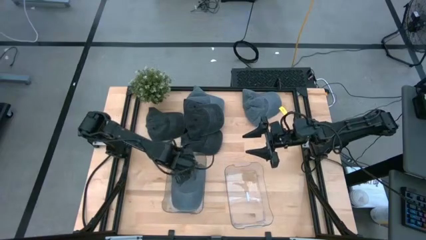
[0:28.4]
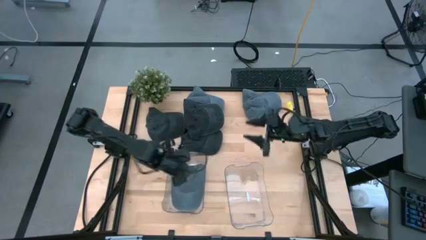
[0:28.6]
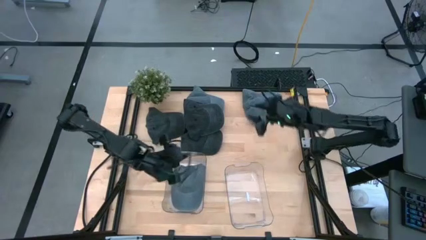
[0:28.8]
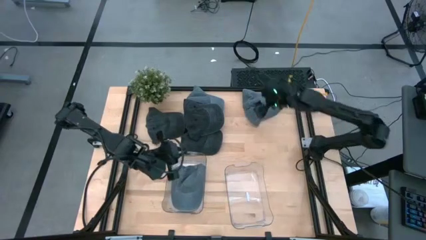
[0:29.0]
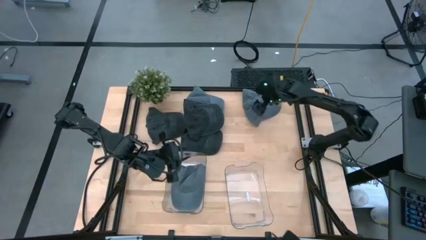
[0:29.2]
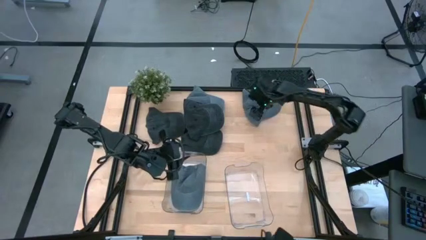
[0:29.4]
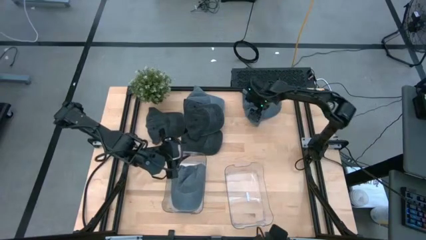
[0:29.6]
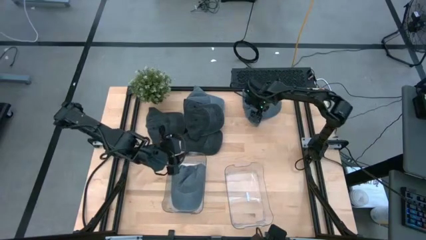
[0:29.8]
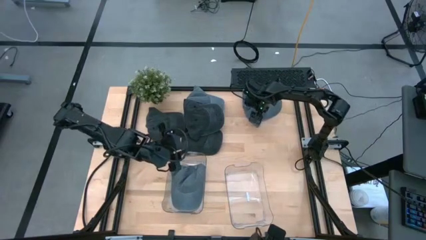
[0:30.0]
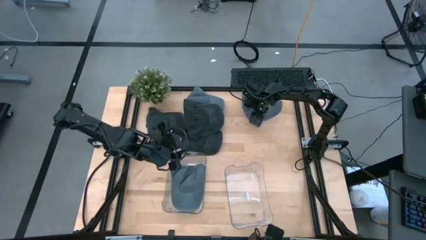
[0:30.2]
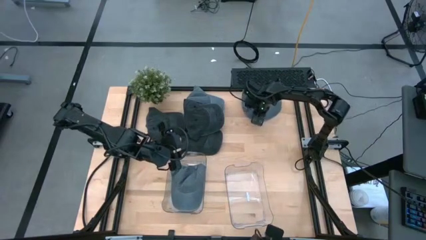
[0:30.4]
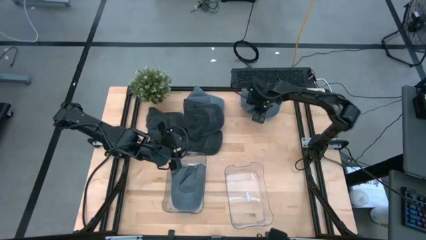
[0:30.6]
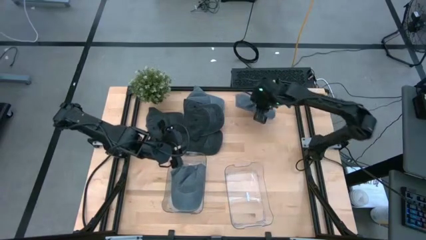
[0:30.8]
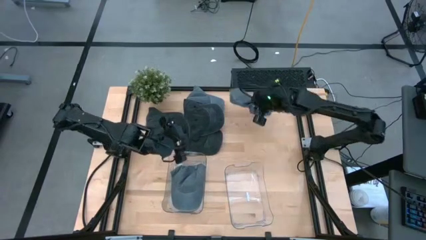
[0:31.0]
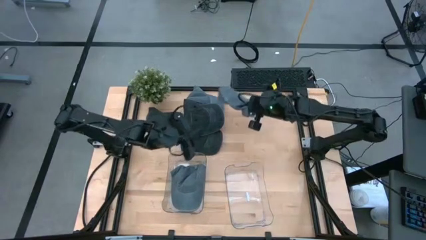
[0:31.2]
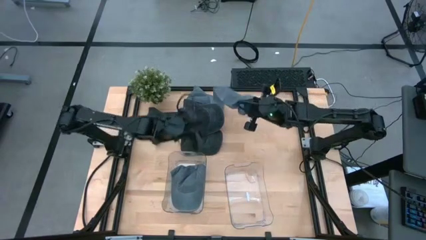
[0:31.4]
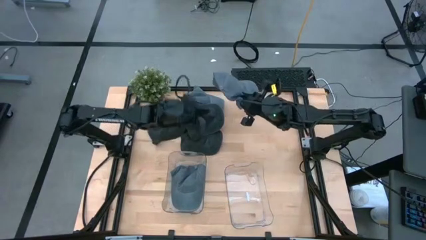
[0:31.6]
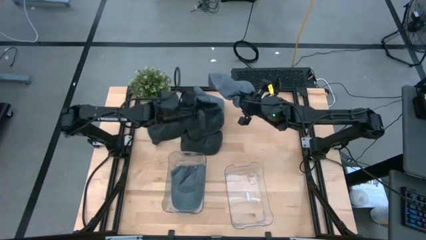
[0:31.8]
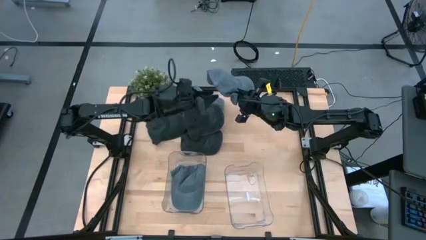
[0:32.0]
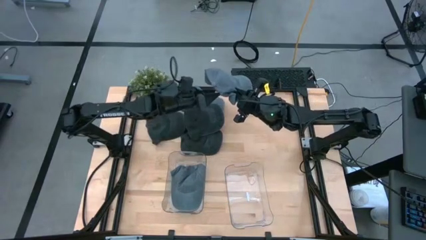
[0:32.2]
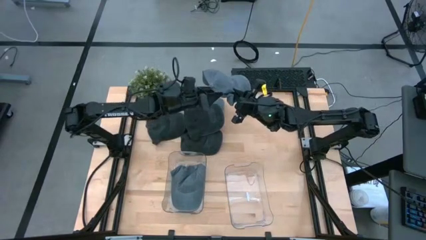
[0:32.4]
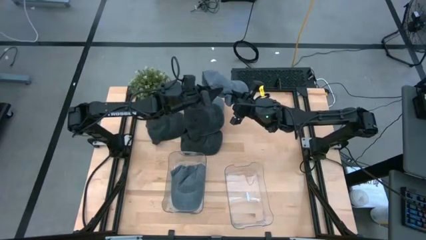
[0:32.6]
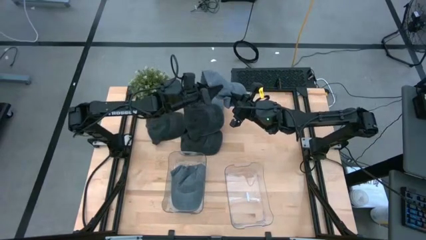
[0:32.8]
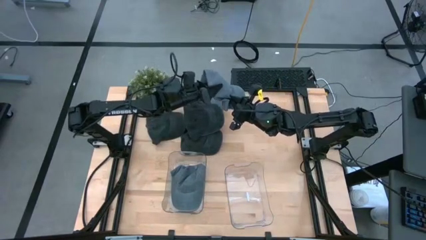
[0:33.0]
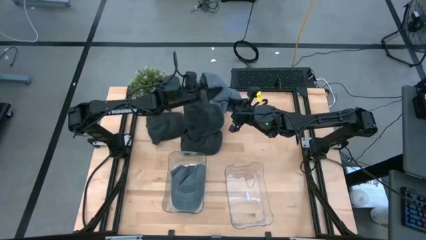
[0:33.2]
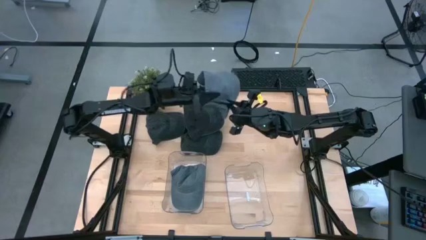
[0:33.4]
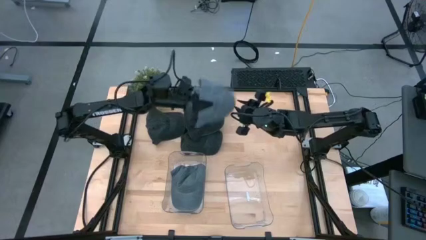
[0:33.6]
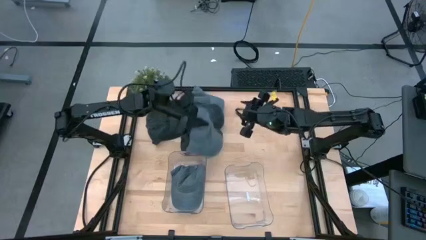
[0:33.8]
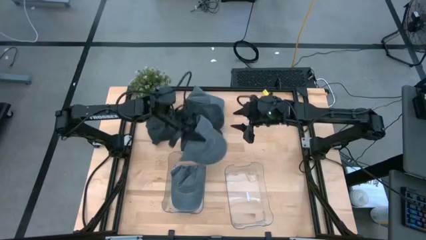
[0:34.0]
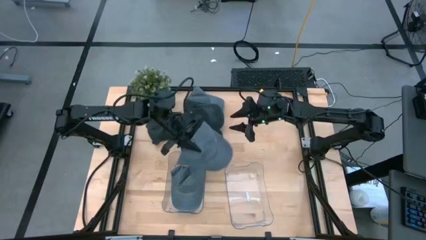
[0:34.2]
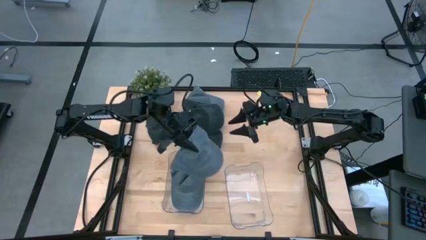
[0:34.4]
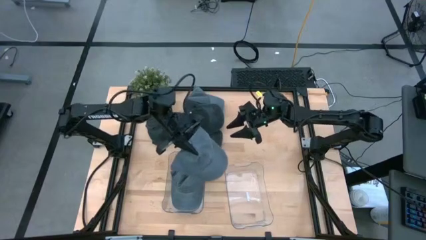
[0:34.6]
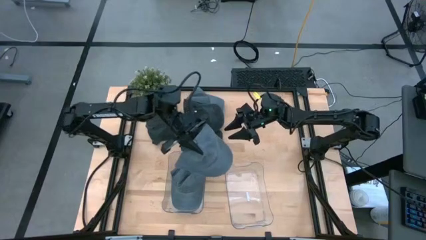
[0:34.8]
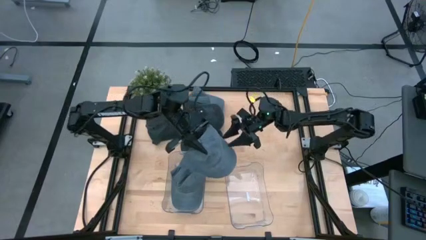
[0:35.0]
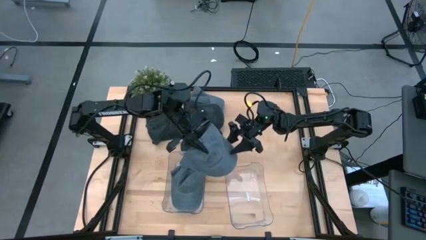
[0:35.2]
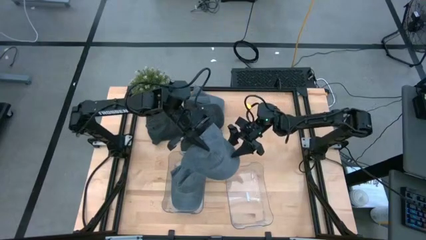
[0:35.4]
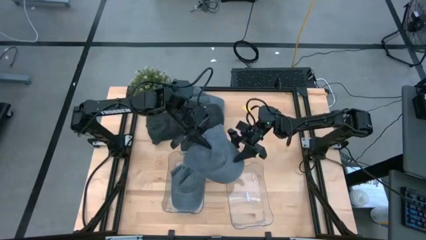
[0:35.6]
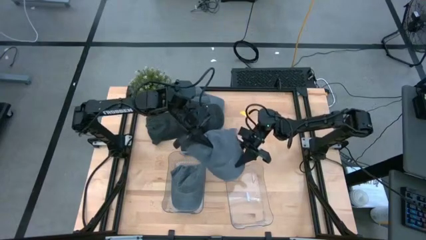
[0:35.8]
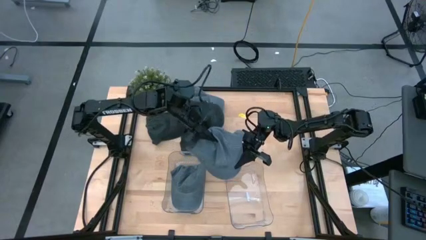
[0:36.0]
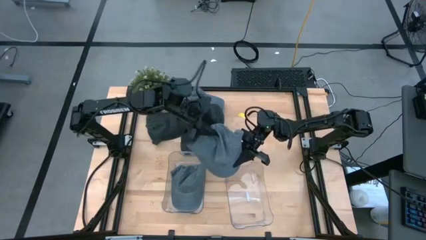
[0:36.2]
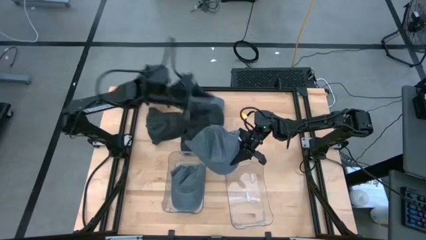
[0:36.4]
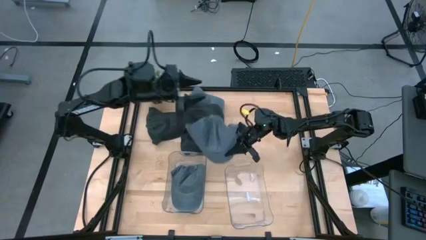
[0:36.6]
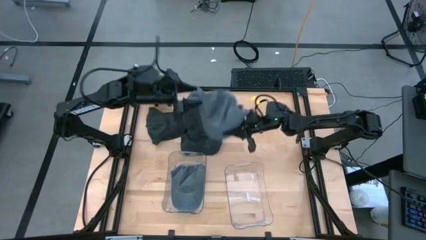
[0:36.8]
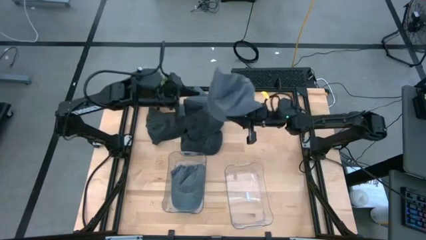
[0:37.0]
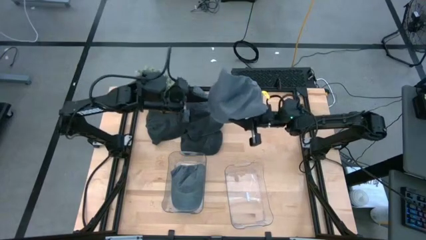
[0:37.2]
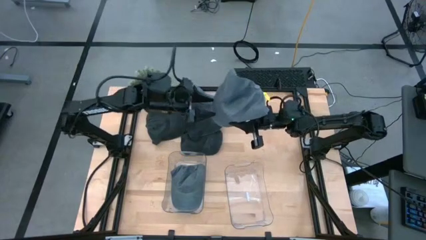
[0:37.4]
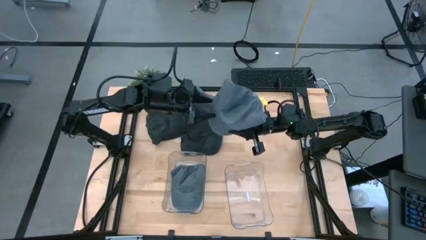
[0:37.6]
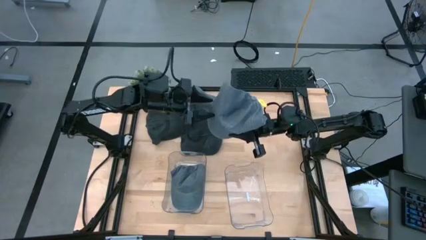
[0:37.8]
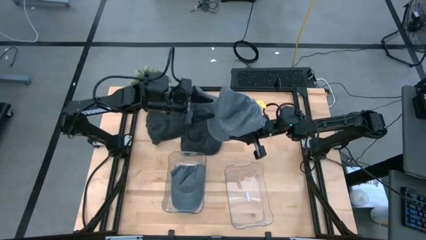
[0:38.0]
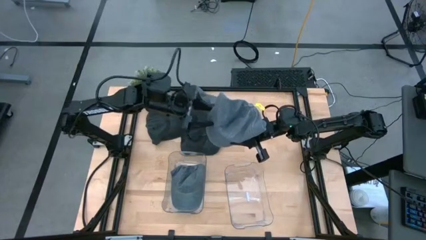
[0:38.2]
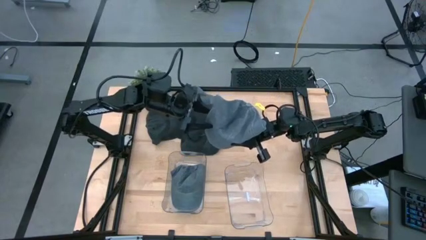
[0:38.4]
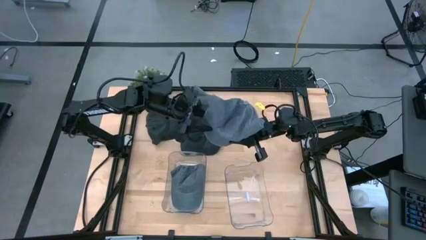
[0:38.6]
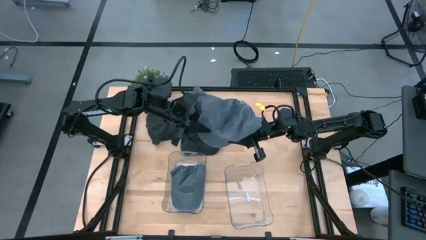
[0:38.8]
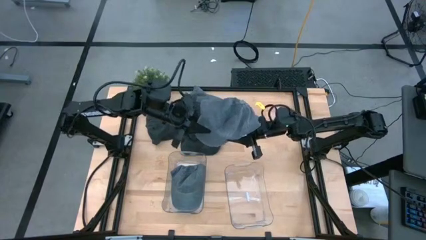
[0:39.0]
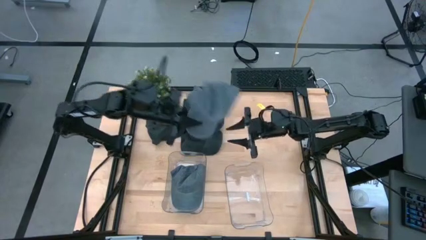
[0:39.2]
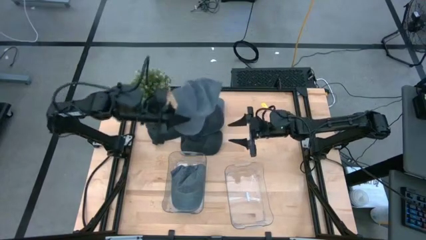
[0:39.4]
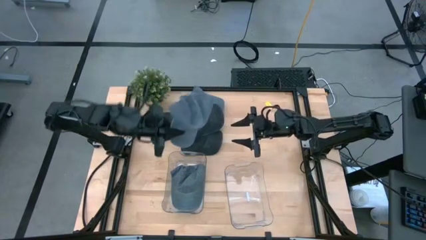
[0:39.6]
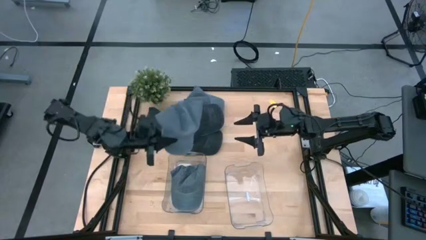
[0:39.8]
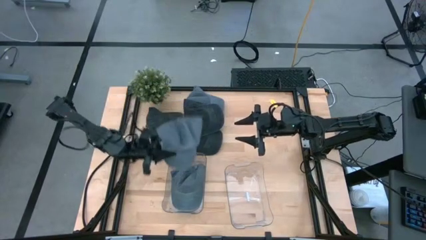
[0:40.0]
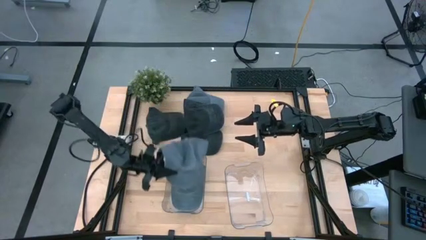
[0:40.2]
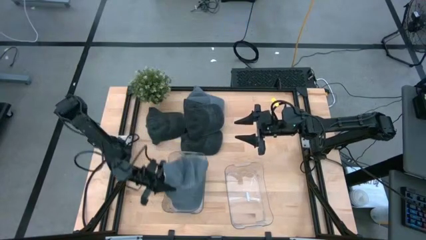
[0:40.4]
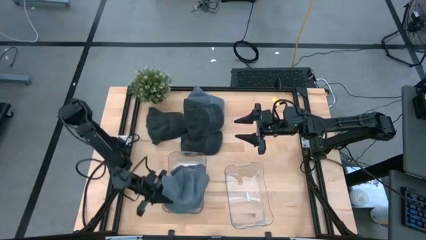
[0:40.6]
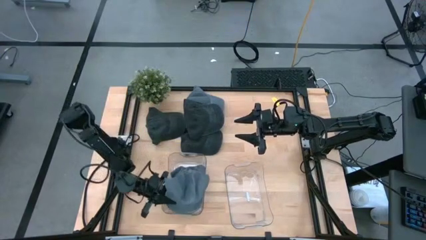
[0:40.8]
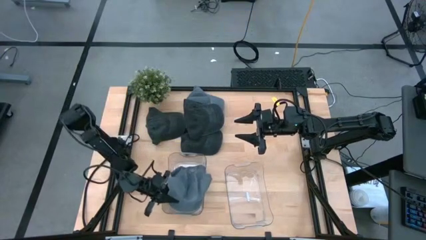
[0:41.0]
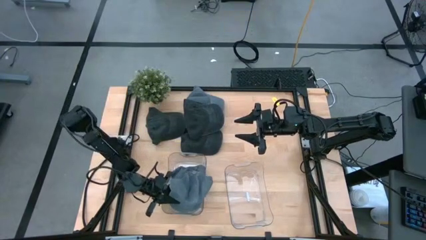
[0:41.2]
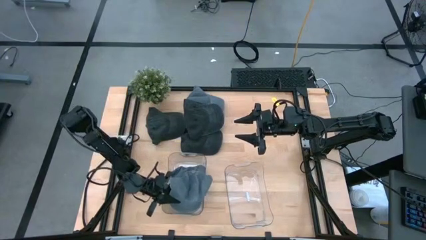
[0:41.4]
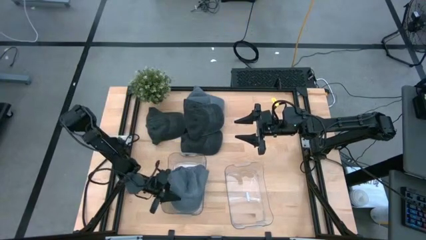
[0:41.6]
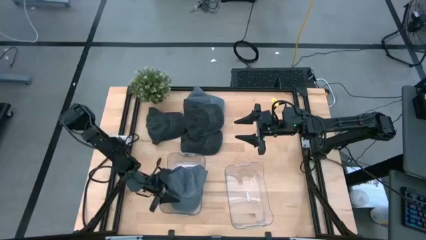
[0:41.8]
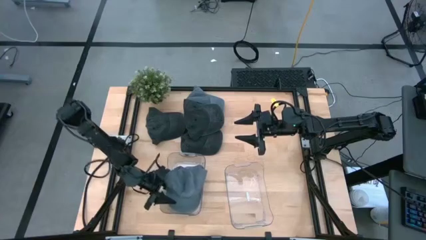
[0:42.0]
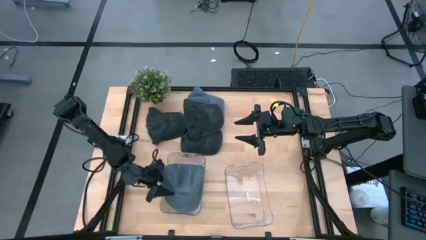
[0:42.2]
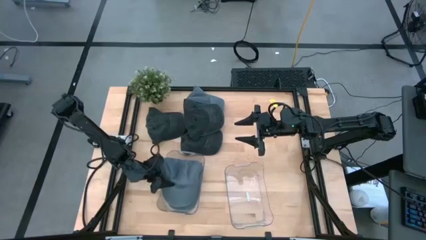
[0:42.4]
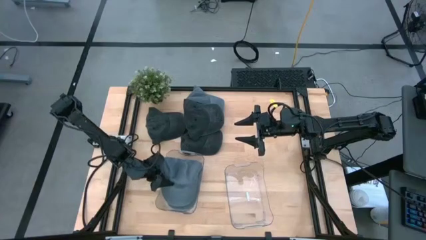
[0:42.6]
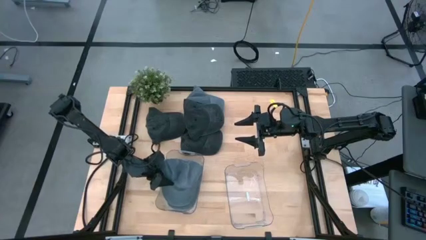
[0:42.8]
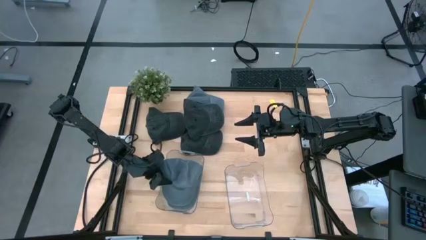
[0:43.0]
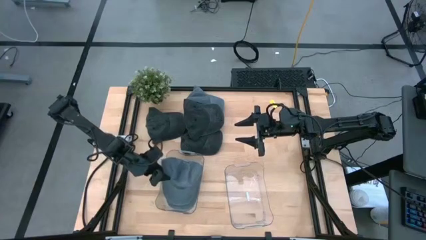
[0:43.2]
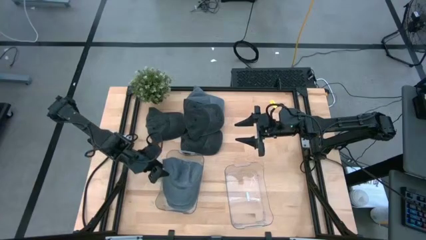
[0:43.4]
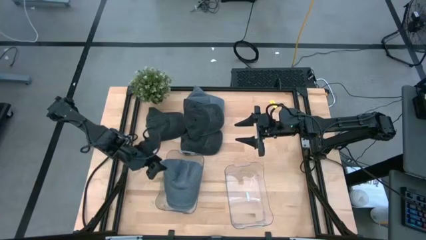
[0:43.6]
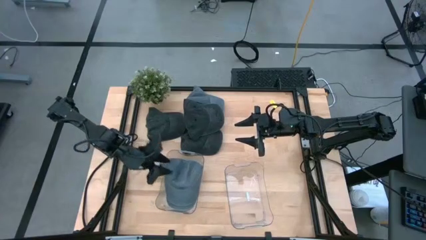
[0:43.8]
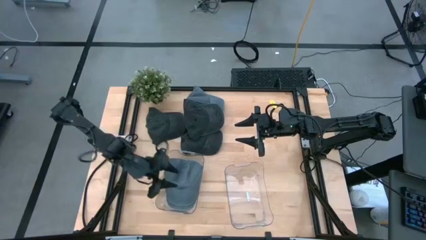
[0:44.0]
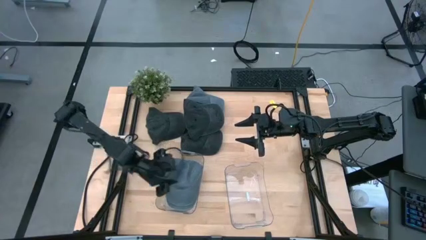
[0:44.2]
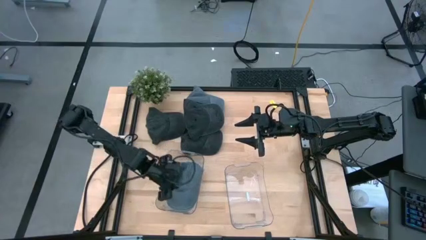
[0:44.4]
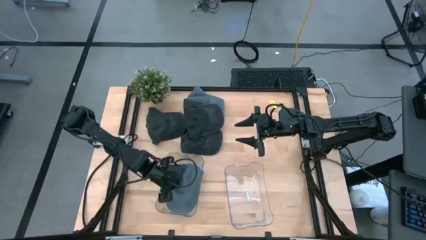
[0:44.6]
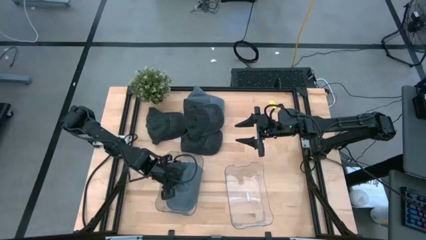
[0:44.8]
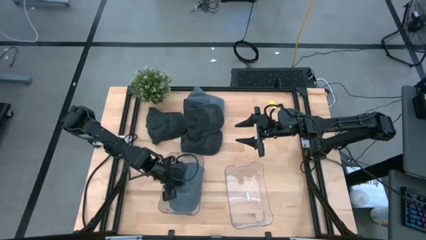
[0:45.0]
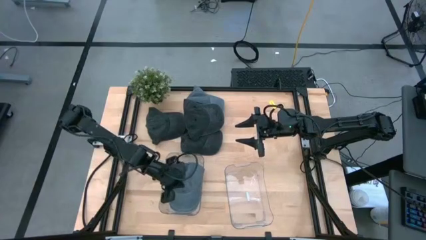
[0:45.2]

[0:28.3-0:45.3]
Task: Pick & Place hat
Put the right gray cap into the left transparent bin
